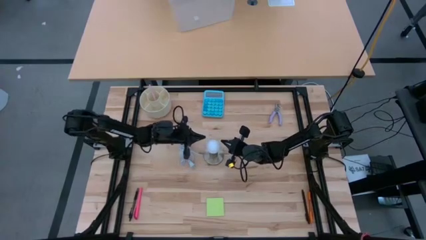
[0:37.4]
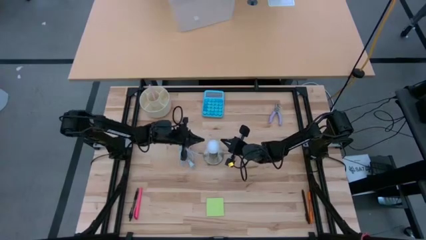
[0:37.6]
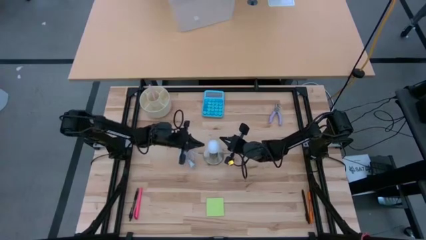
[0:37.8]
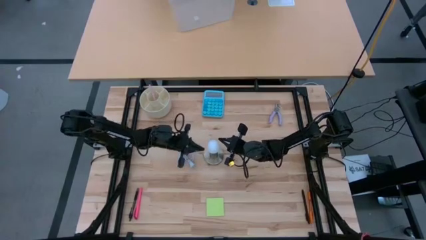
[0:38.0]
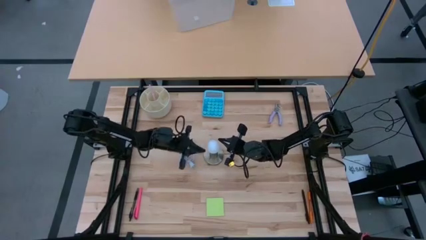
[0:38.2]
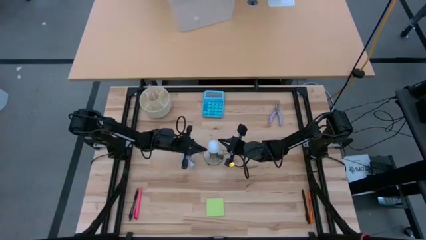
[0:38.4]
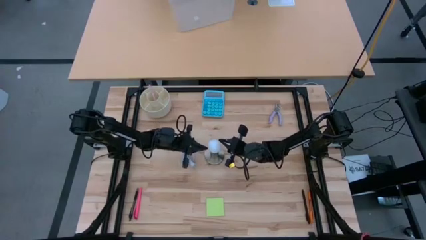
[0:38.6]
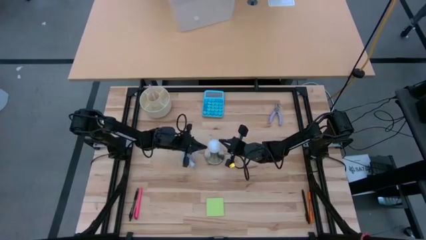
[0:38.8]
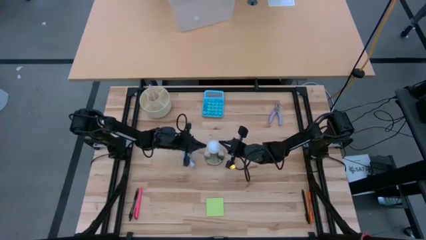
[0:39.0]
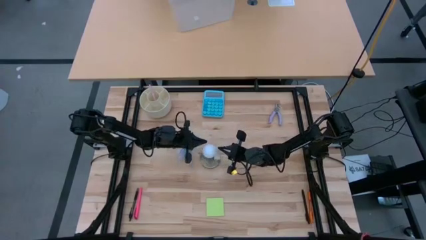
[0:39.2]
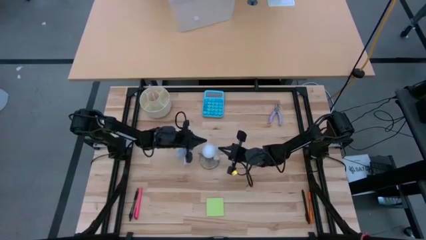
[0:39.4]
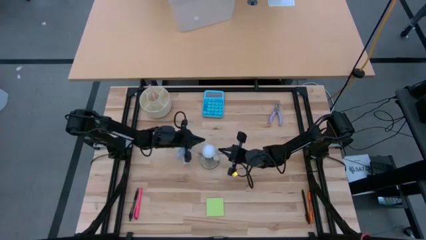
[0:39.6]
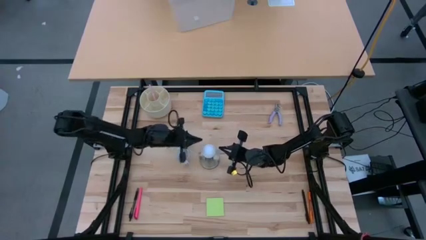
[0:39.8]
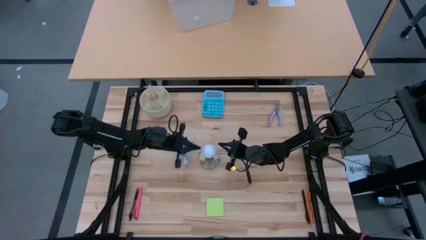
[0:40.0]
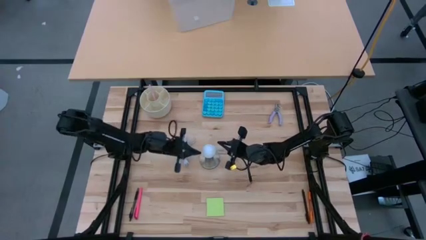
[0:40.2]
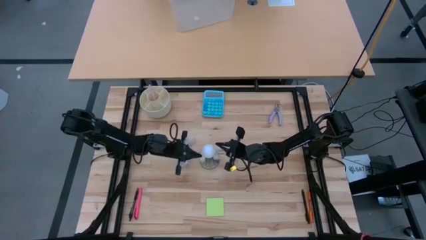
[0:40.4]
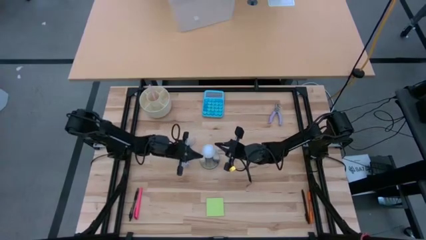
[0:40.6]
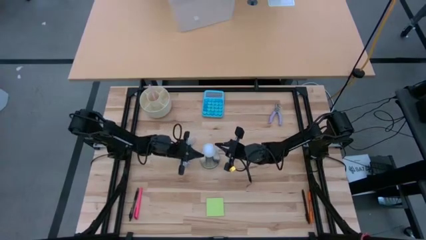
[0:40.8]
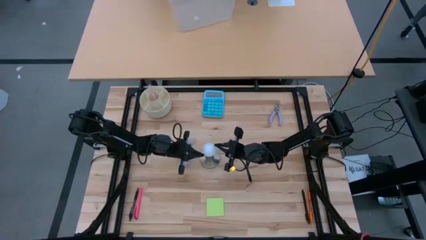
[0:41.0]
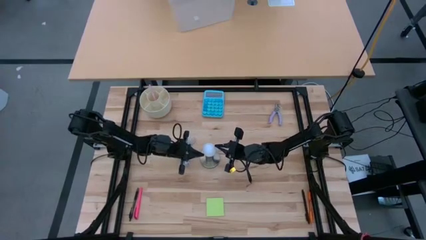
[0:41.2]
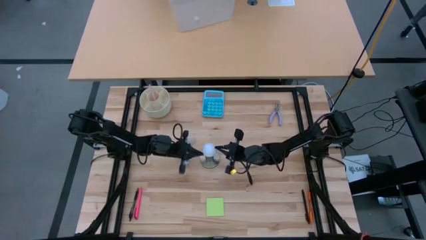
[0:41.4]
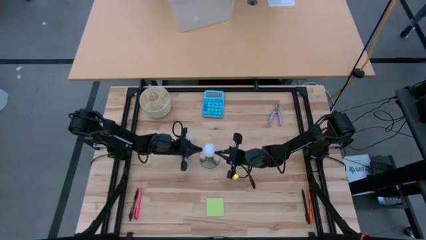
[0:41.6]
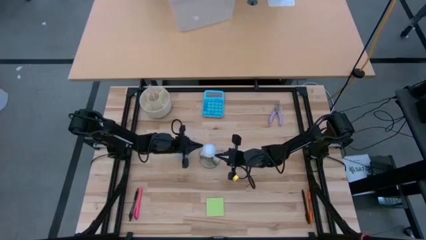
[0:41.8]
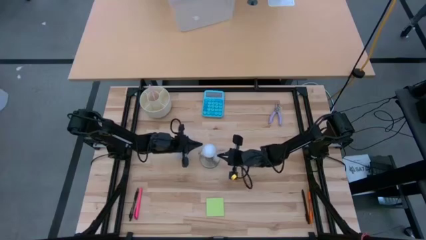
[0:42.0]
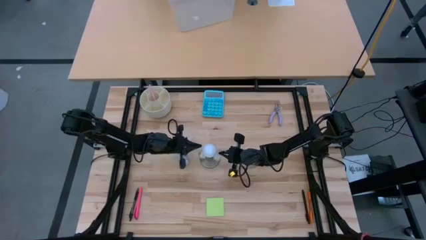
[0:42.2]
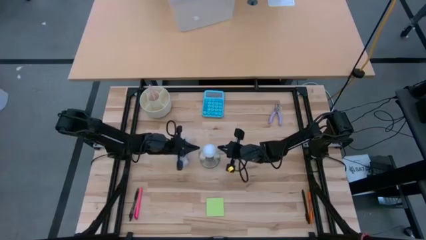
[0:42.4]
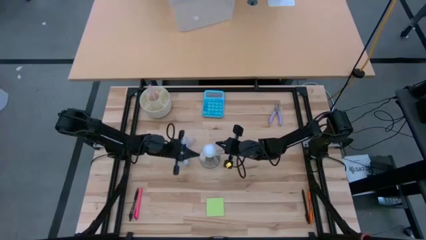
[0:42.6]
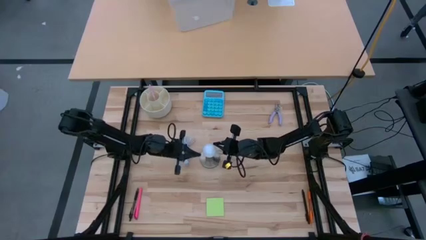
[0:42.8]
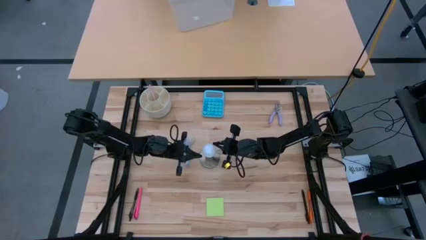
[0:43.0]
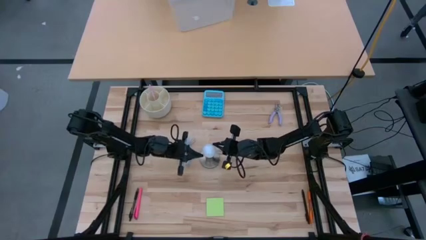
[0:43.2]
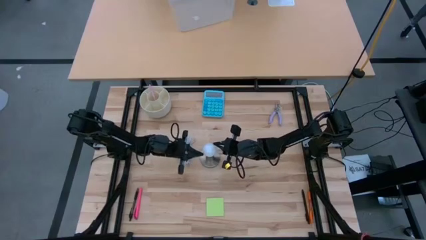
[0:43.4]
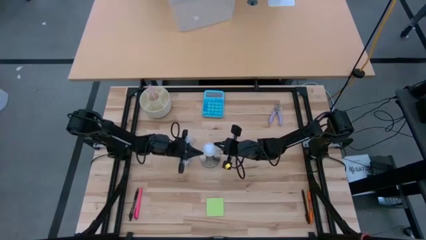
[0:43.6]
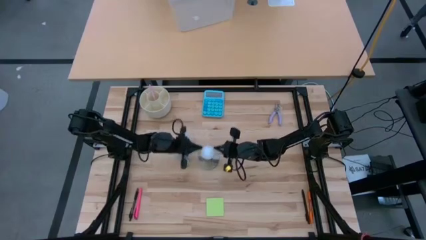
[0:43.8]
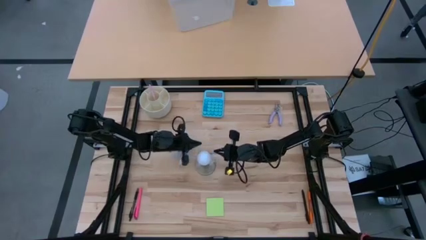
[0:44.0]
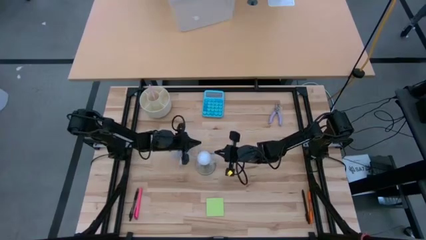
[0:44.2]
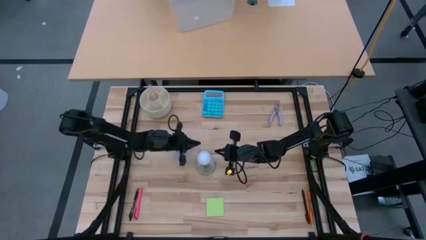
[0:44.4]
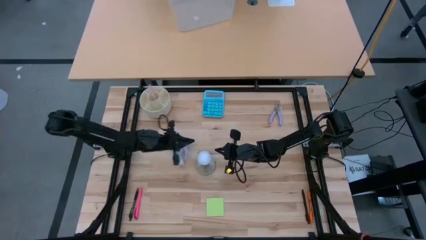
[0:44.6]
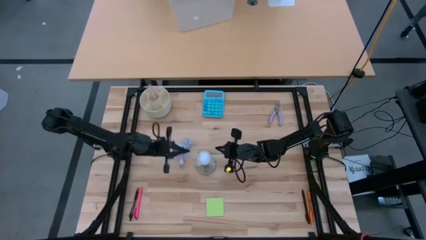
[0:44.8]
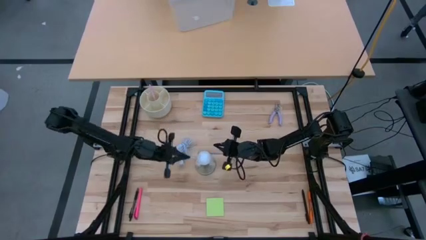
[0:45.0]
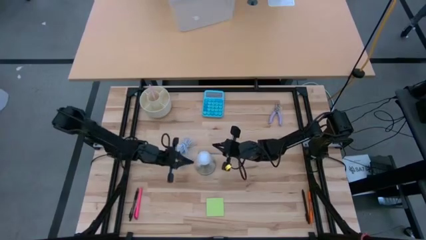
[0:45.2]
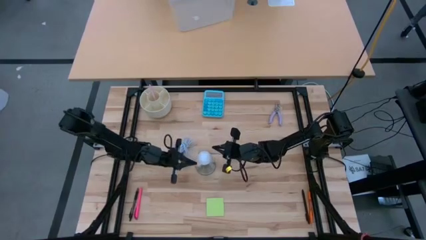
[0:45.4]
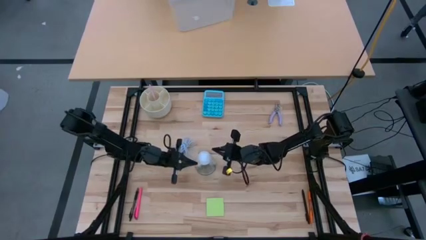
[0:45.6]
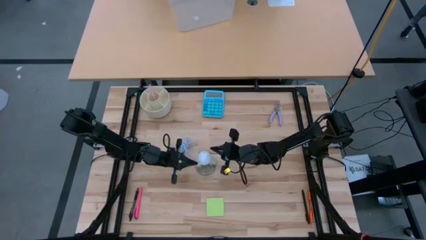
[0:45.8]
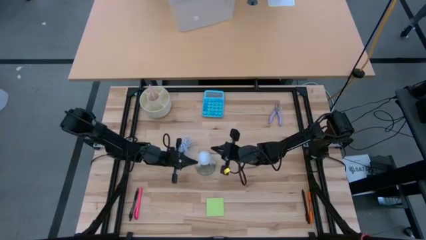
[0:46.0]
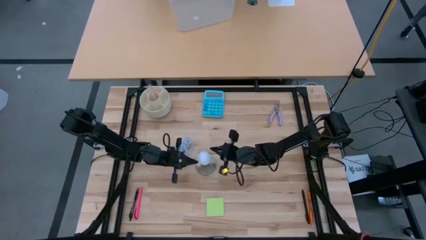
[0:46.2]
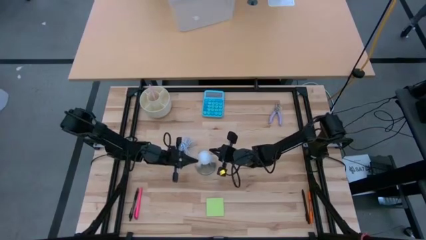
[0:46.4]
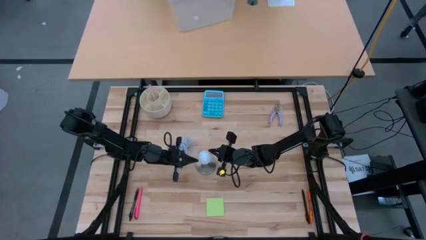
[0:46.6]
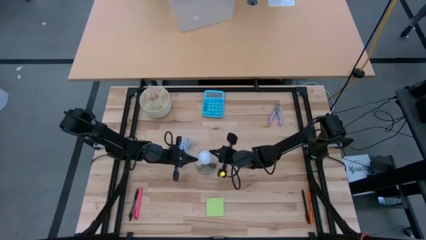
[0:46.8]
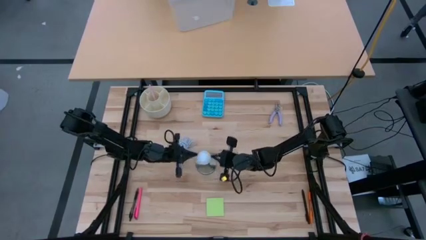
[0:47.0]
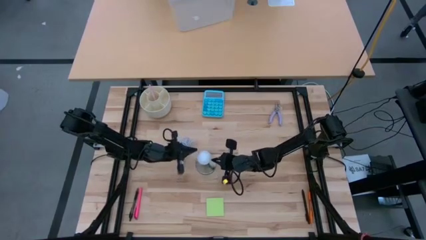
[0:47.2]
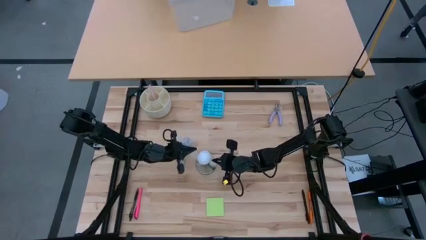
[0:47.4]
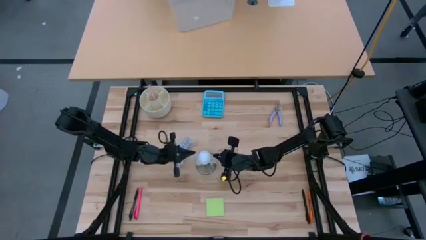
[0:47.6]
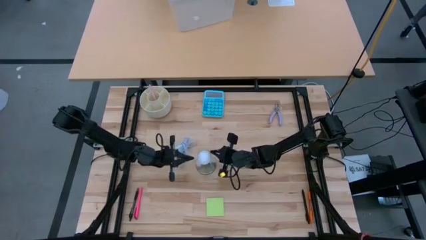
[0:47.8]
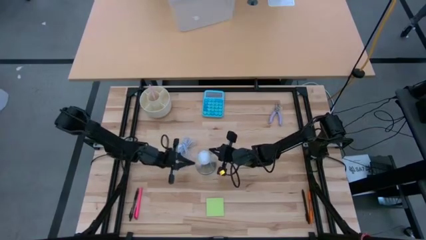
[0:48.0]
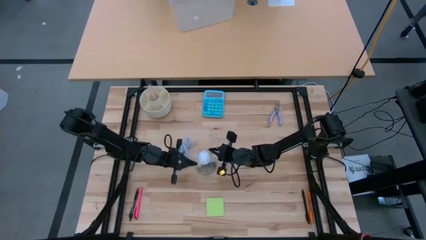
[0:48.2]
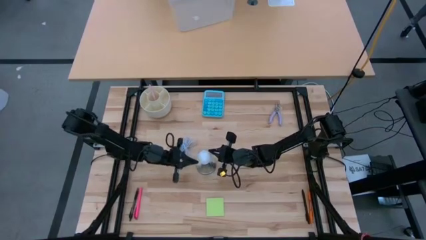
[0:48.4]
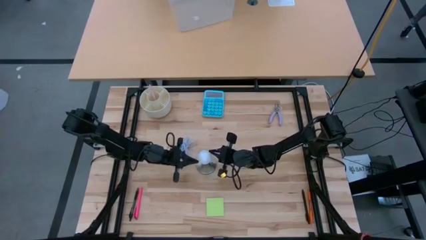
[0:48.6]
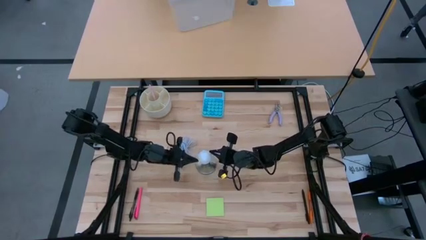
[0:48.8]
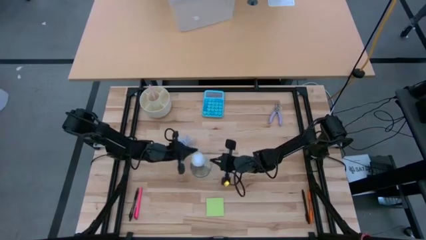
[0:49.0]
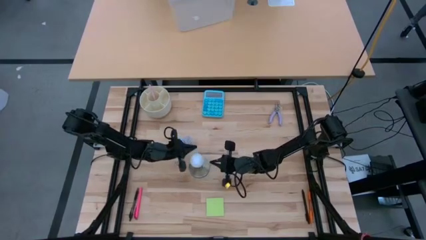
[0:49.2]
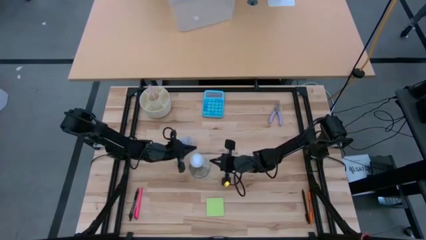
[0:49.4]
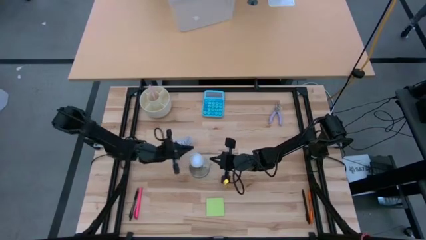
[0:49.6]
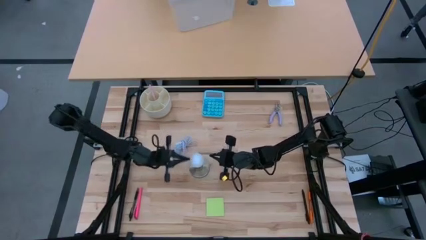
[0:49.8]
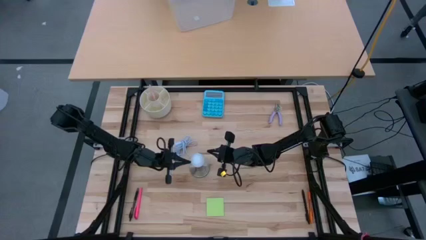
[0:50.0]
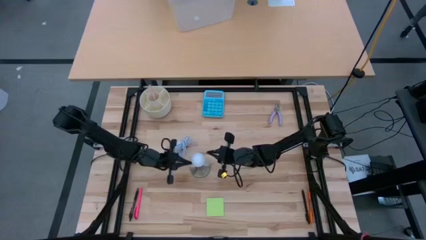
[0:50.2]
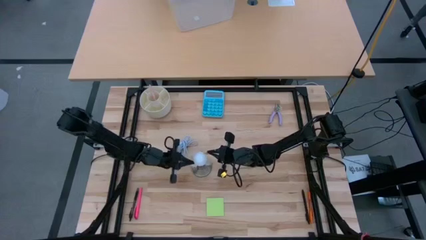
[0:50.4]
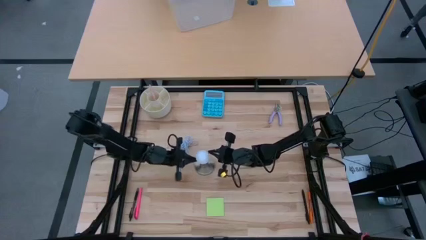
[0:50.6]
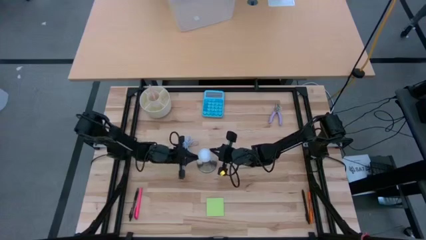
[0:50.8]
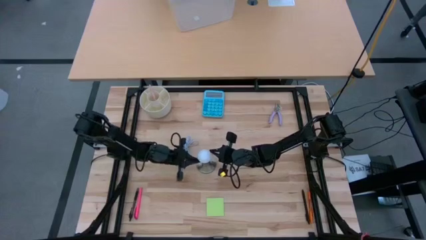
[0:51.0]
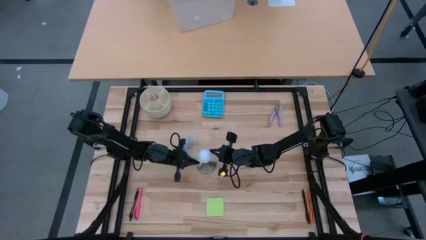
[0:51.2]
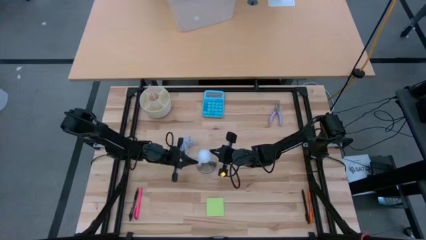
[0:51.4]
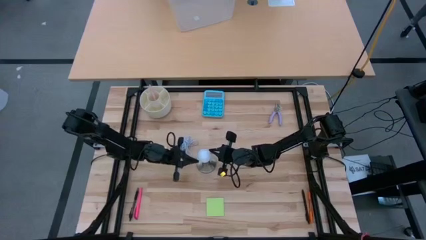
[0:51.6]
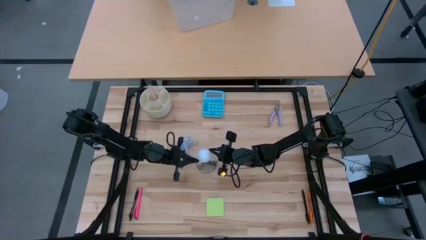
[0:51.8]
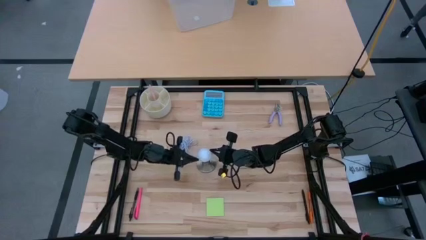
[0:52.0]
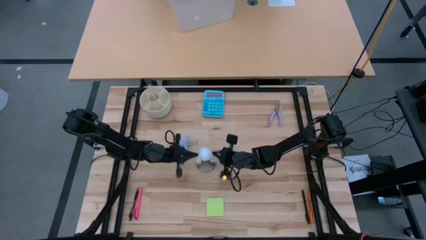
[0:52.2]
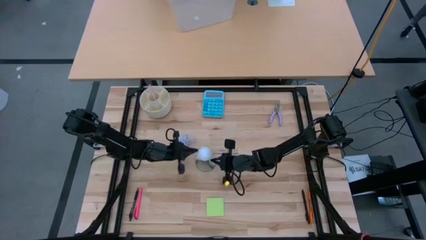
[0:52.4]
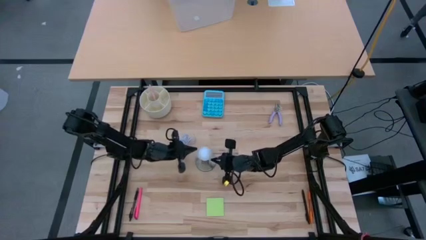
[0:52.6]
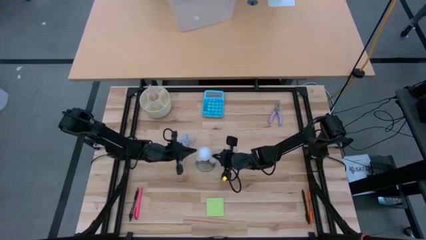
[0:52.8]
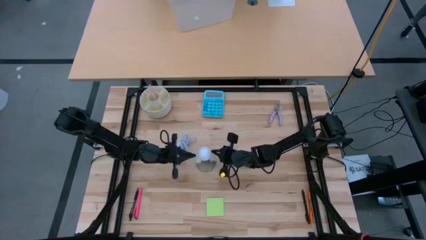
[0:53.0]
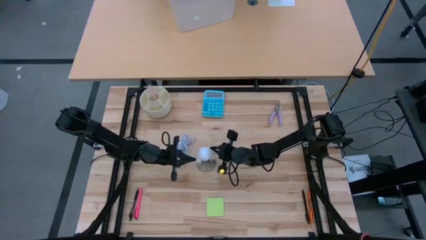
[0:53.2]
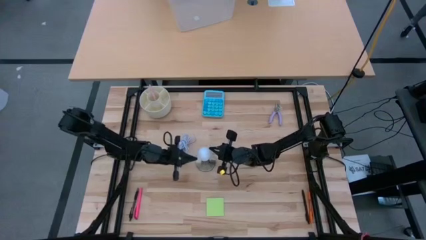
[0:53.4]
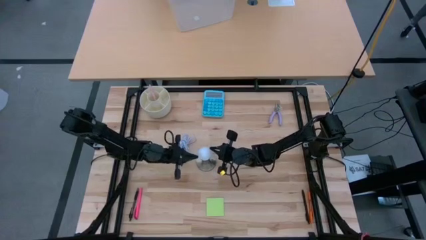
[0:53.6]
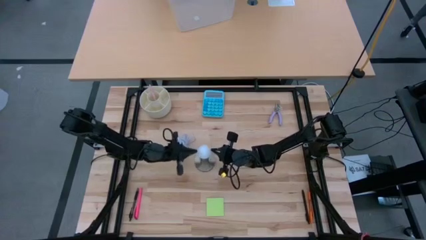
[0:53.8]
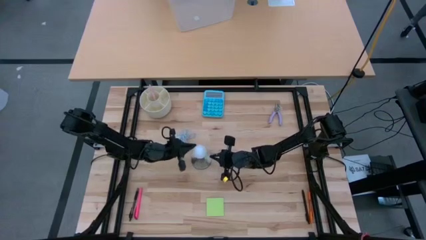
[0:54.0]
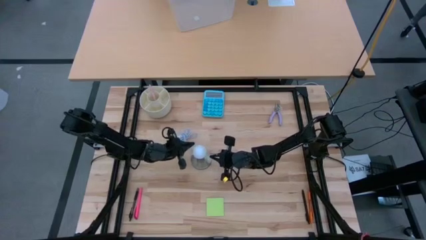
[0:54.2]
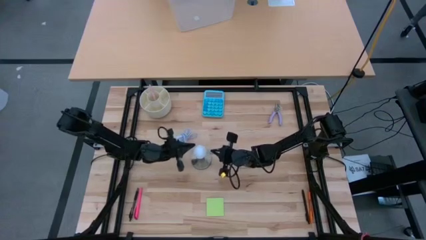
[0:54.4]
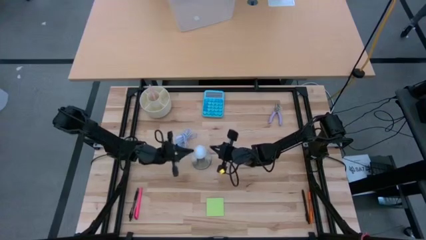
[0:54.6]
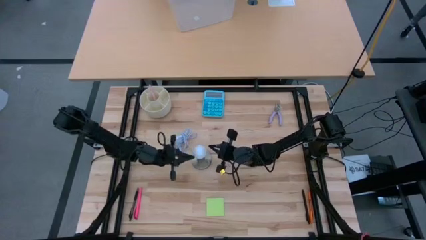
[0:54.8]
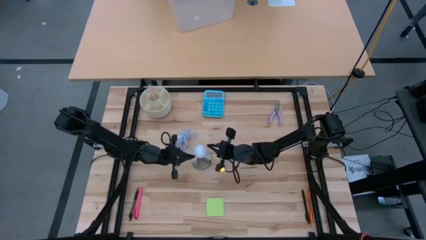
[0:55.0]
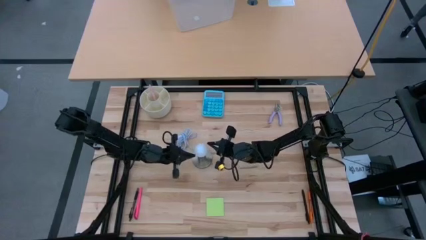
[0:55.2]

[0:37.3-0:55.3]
Task: Screw lightbulb
Insert the lightbulb into the lamp
